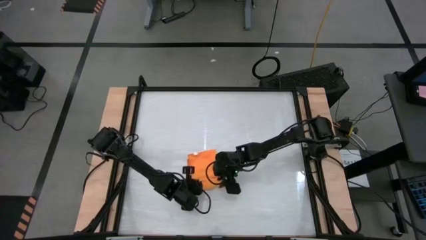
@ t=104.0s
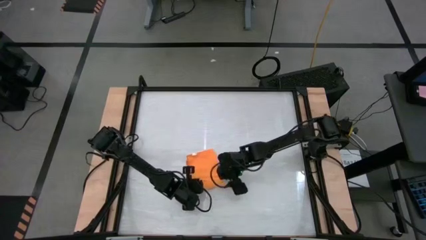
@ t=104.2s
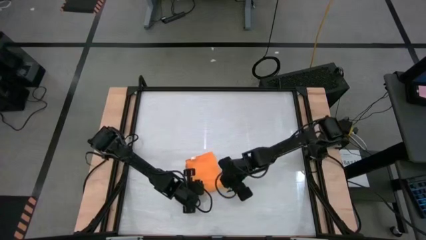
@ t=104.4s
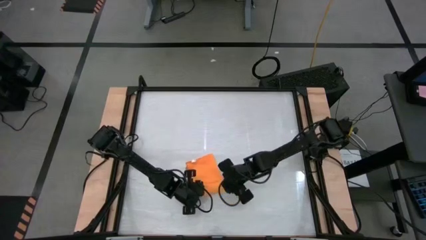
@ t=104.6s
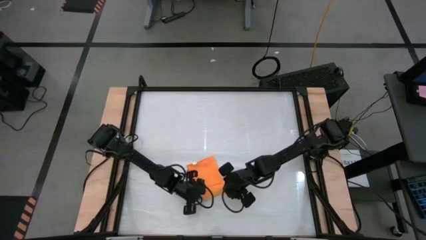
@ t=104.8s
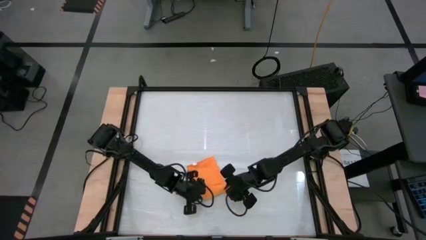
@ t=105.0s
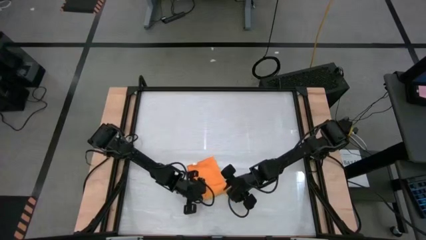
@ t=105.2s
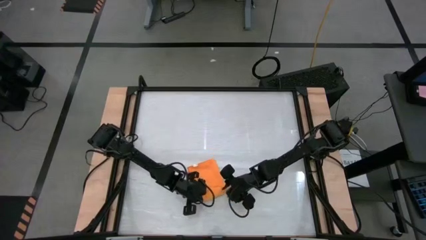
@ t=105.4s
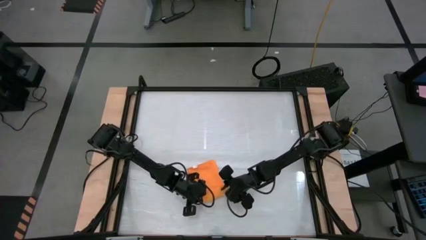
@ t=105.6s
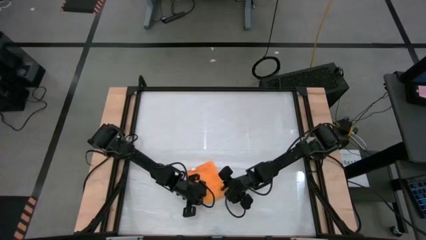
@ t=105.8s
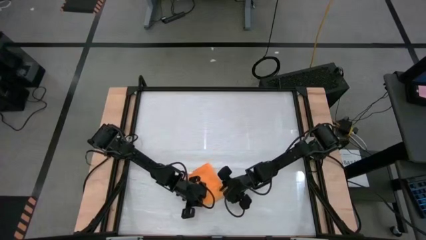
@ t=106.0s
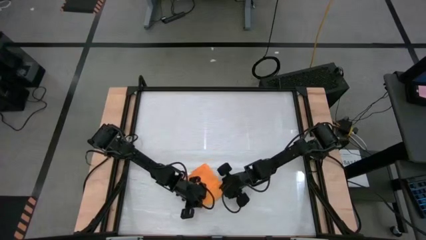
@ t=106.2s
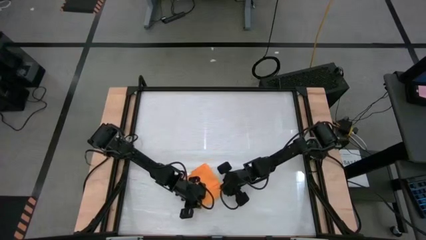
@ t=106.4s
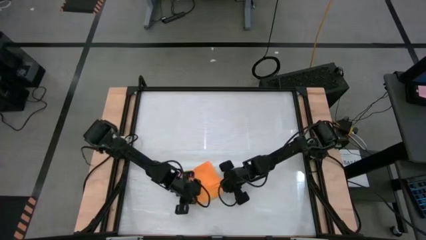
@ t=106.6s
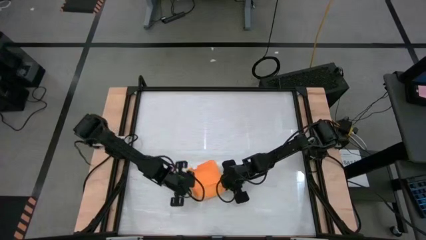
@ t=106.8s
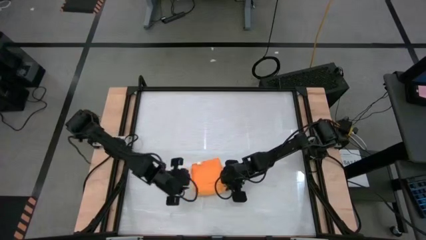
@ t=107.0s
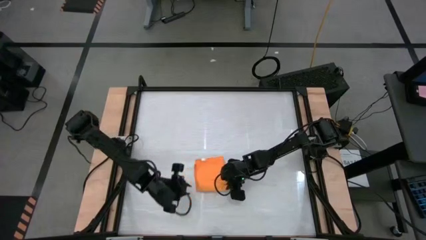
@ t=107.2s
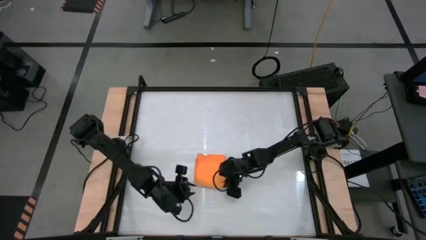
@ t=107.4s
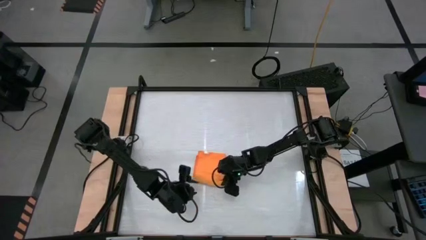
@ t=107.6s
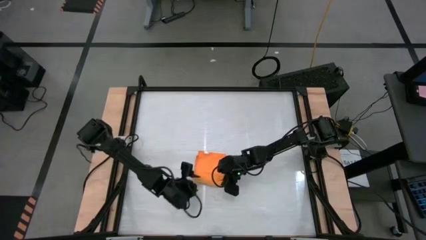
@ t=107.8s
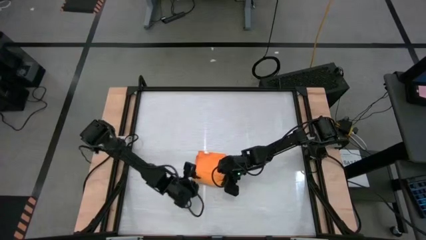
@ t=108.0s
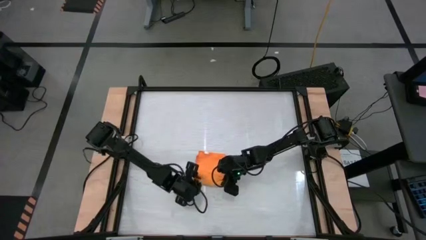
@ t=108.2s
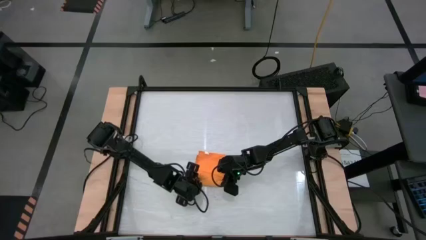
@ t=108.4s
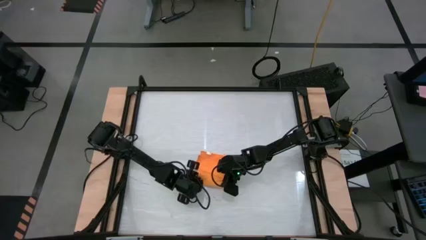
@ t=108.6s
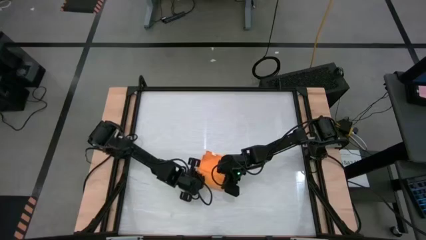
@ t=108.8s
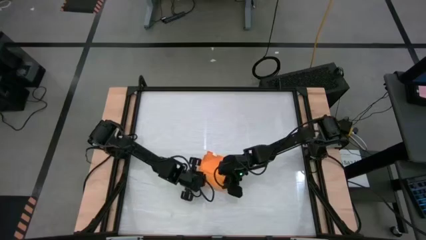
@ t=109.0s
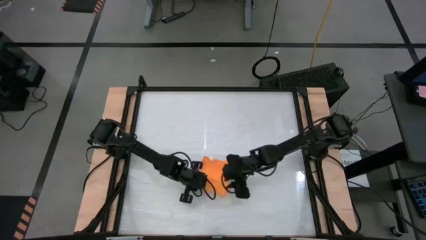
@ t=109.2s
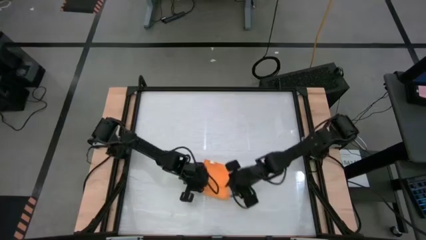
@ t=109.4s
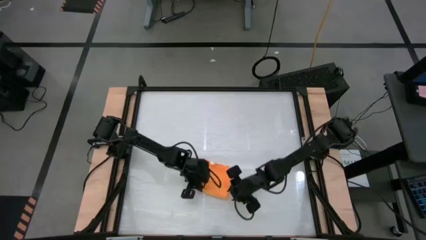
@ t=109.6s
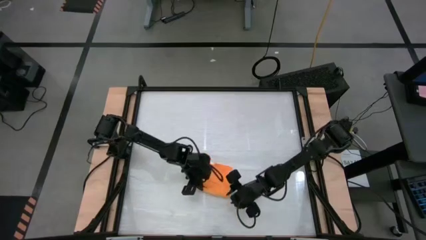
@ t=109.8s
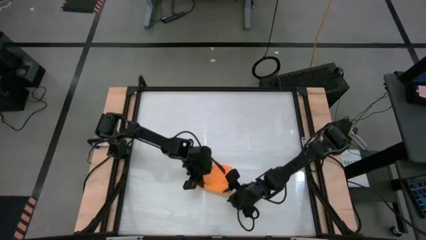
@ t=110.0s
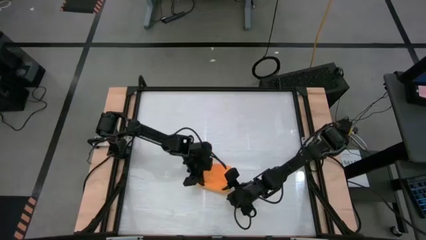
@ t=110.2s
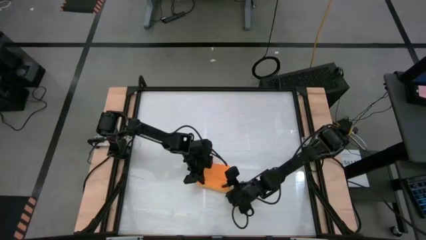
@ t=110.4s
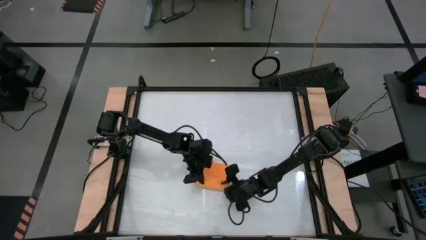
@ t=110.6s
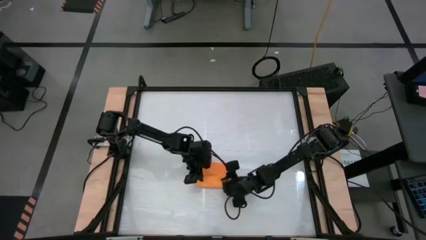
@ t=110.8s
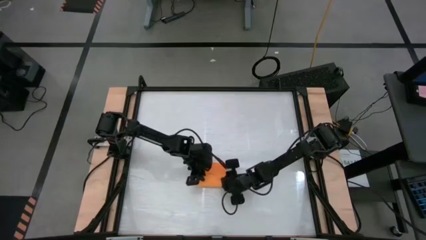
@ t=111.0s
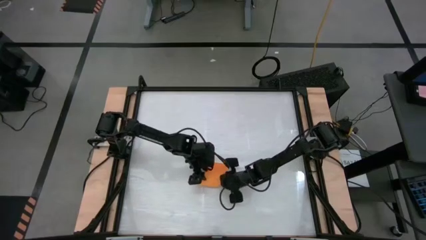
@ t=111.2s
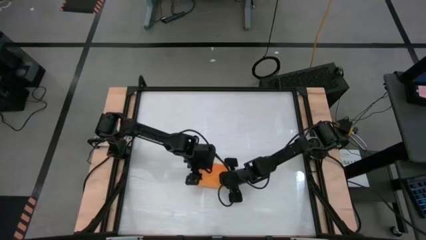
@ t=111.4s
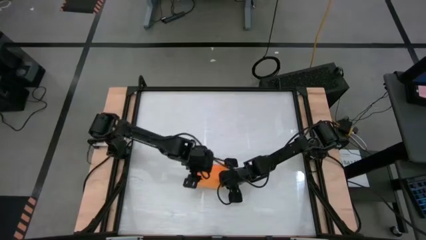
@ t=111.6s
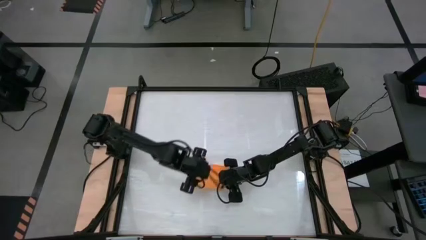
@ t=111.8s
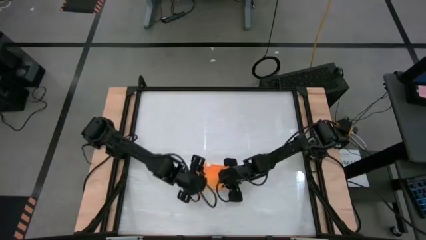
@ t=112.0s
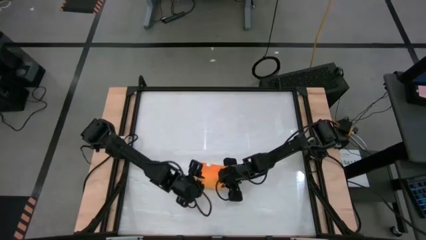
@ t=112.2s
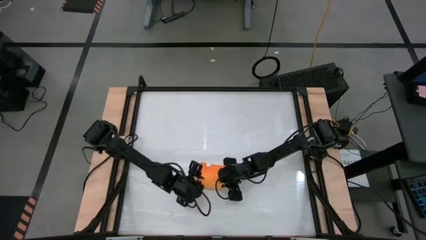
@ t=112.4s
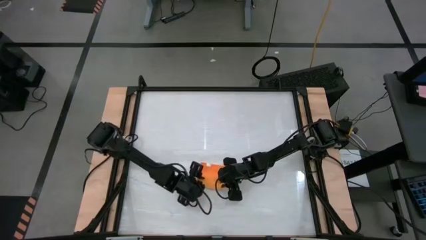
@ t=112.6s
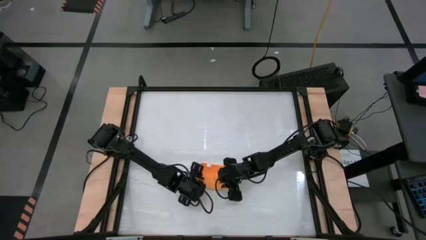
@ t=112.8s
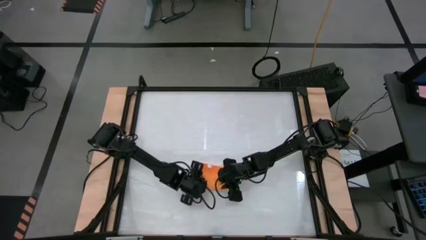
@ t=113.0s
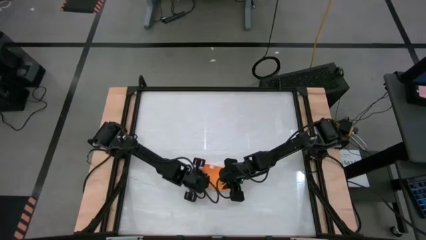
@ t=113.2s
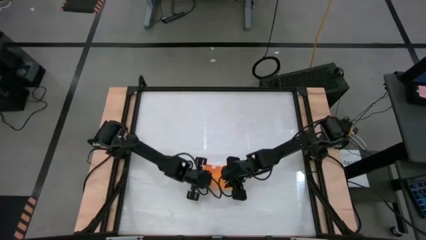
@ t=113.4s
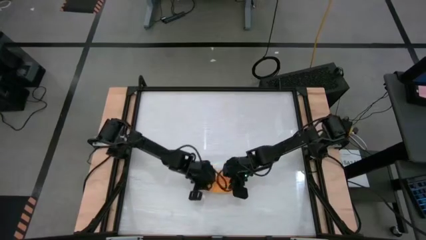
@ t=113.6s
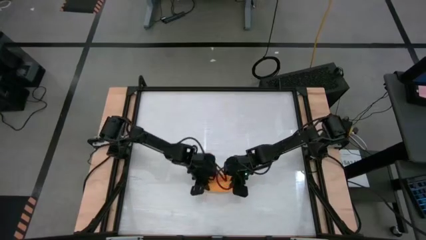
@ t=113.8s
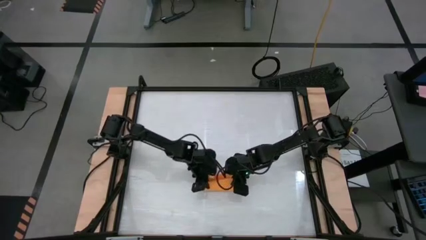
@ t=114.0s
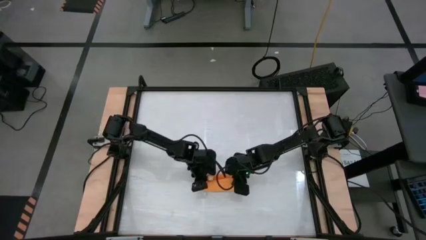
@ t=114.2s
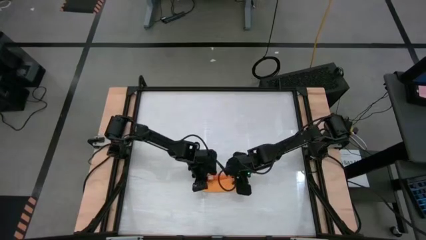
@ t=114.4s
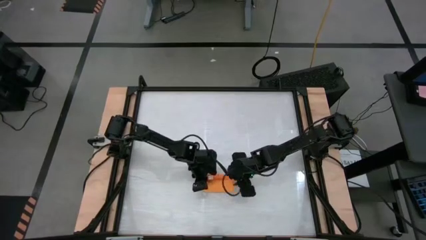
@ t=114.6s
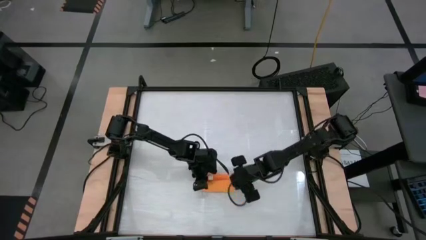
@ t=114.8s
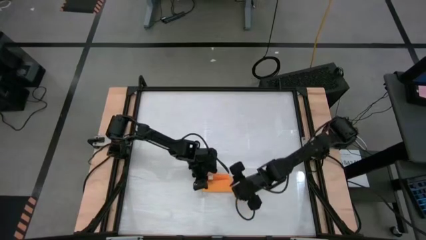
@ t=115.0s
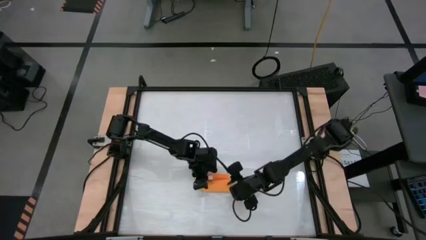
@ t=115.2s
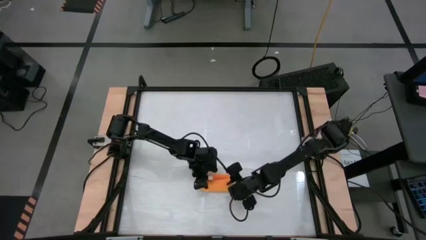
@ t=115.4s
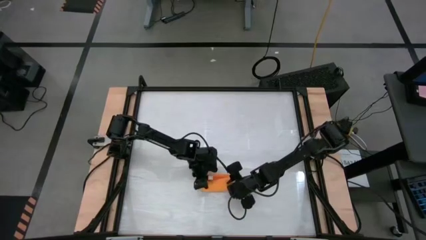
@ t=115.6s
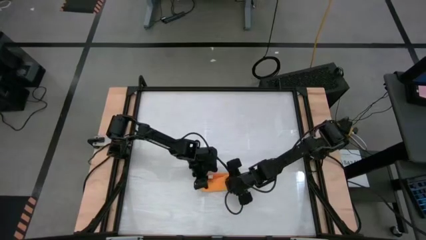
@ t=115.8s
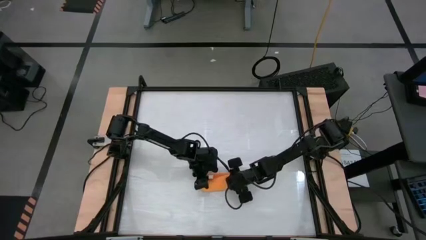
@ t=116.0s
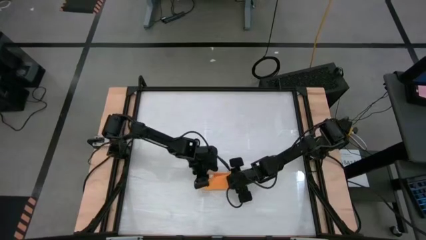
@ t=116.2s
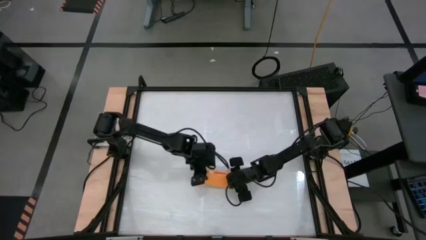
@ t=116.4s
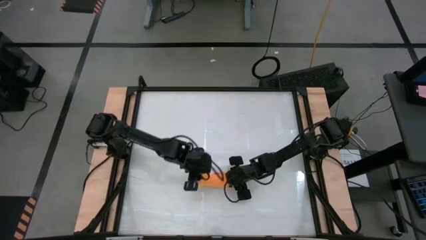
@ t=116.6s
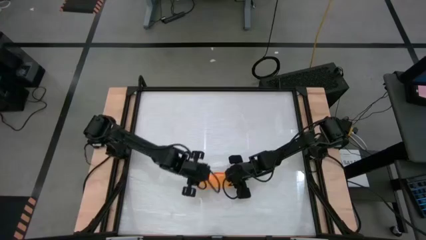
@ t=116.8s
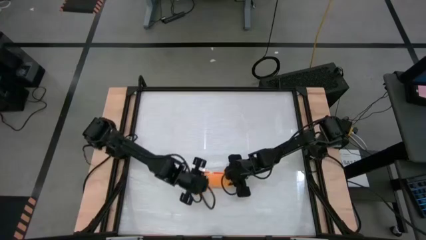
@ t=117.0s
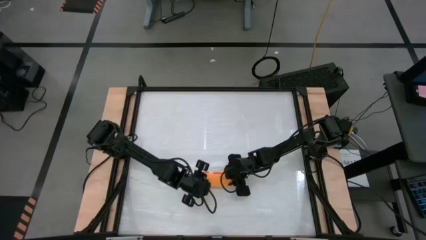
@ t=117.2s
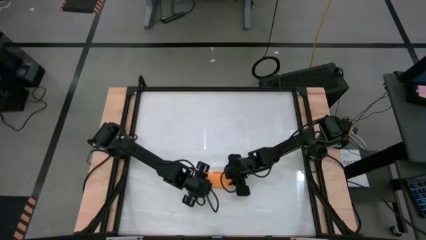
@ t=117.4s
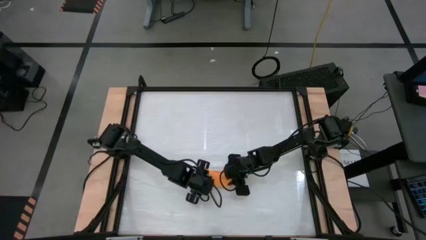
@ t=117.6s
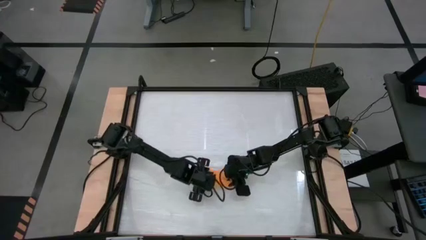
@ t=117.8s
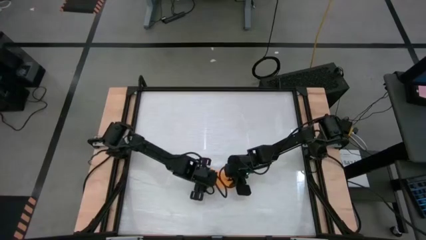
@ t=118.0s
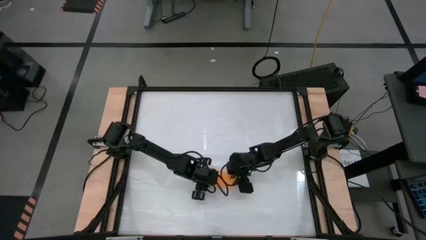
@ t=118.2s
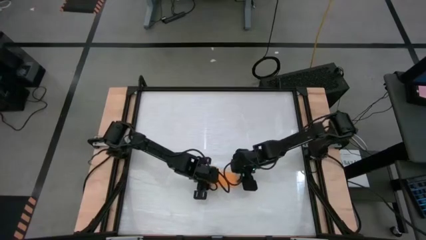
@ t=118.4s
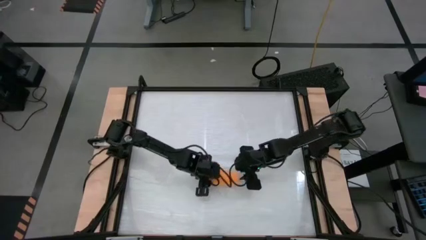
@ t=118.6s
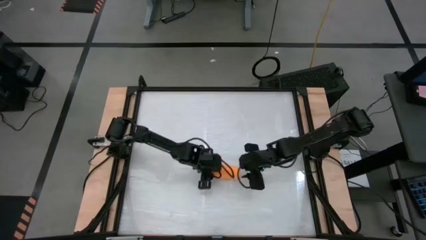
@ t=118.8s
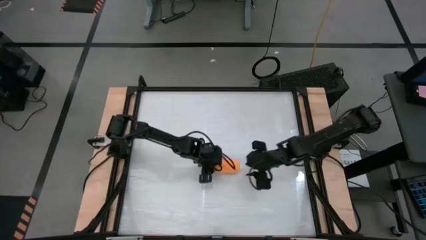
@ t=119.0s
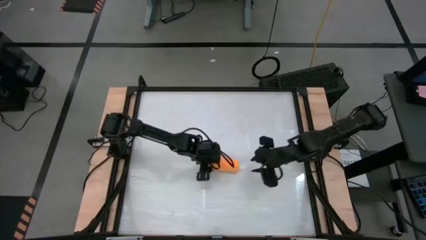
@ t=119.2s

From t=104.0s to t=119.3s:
Task: Roll towel
Roll the orange towel
